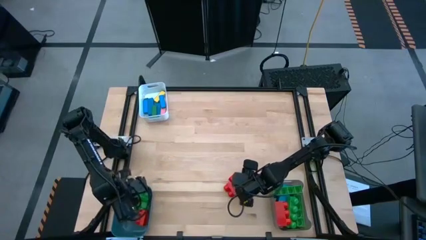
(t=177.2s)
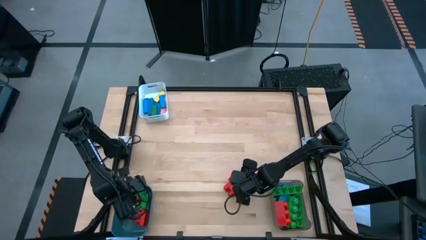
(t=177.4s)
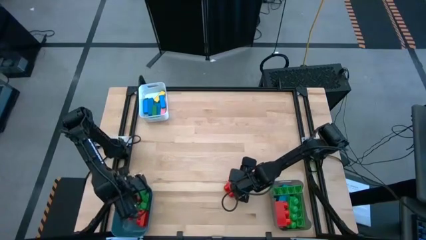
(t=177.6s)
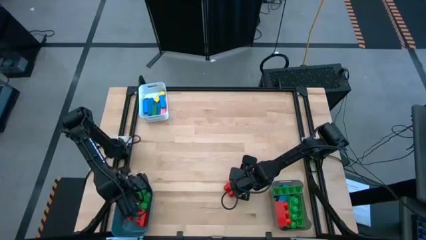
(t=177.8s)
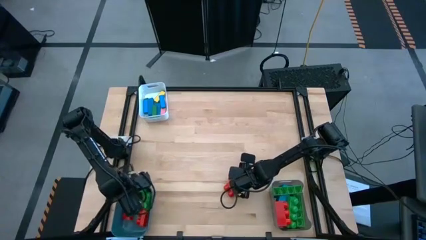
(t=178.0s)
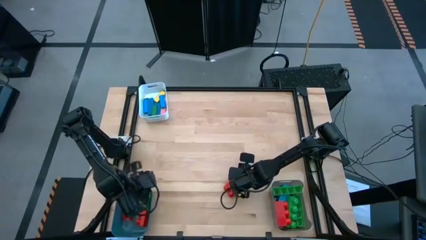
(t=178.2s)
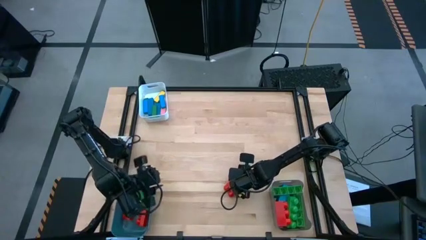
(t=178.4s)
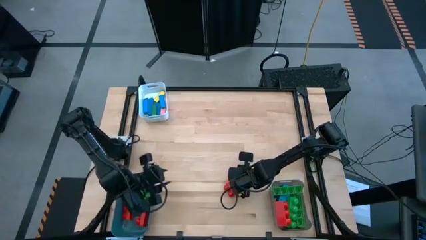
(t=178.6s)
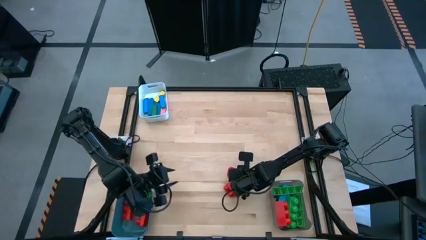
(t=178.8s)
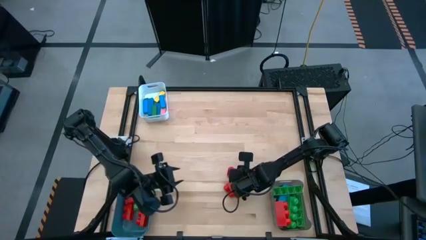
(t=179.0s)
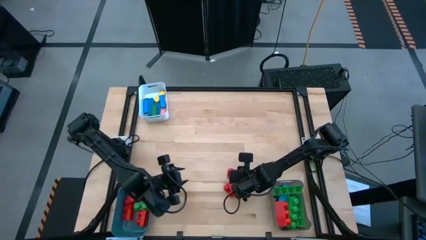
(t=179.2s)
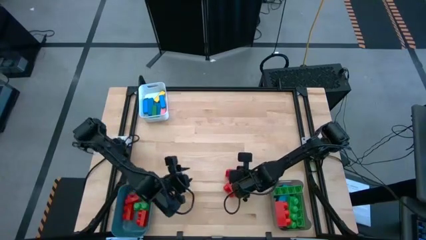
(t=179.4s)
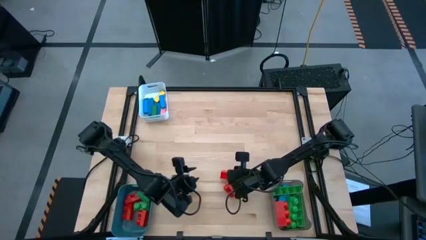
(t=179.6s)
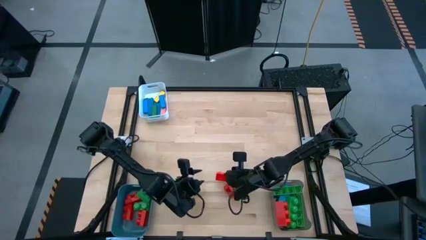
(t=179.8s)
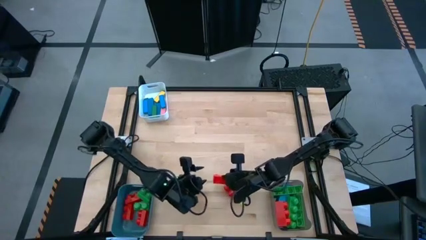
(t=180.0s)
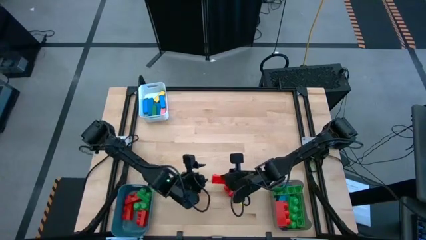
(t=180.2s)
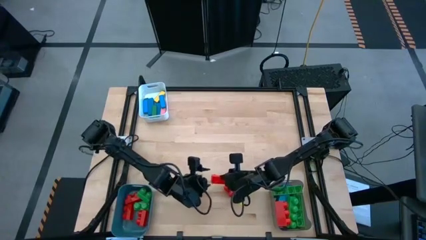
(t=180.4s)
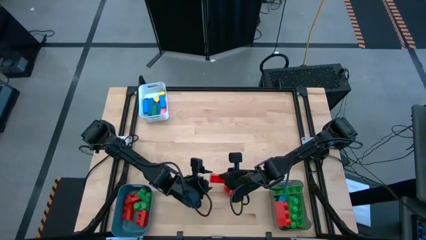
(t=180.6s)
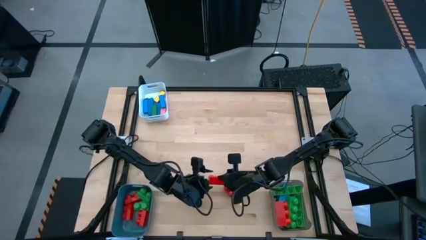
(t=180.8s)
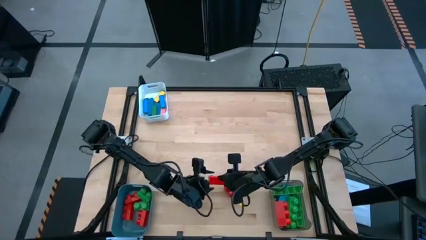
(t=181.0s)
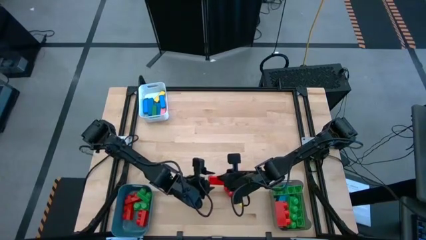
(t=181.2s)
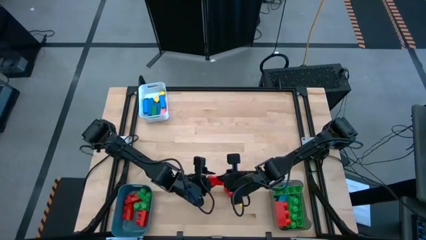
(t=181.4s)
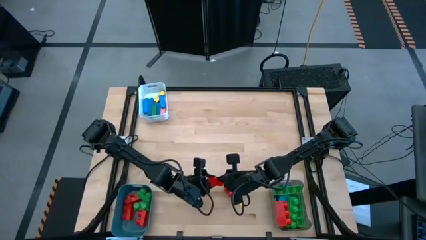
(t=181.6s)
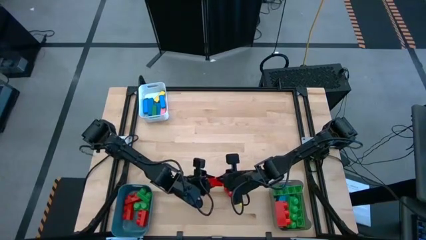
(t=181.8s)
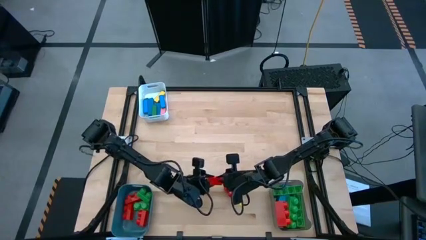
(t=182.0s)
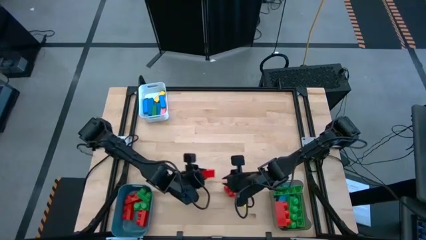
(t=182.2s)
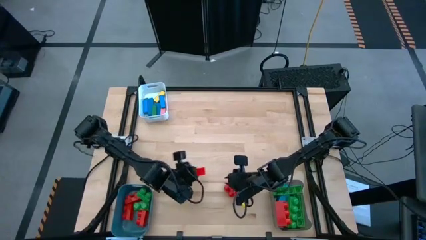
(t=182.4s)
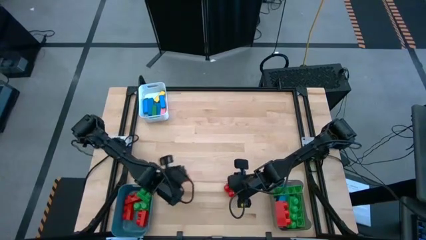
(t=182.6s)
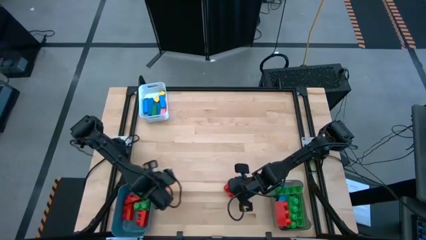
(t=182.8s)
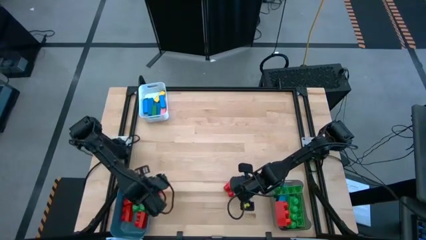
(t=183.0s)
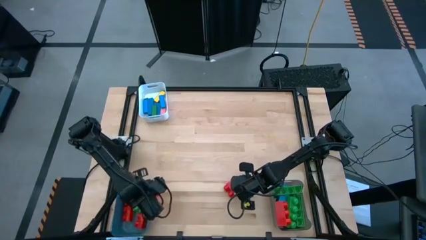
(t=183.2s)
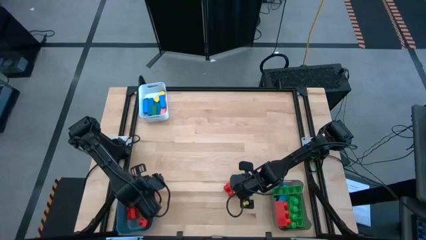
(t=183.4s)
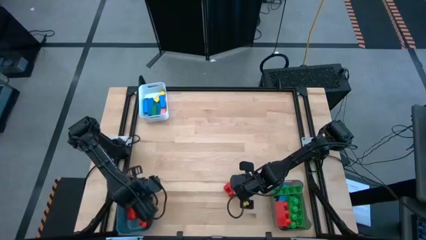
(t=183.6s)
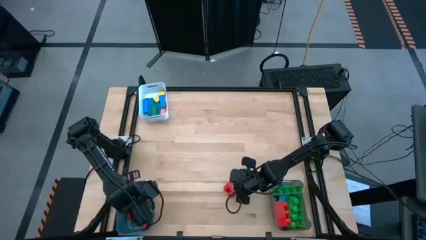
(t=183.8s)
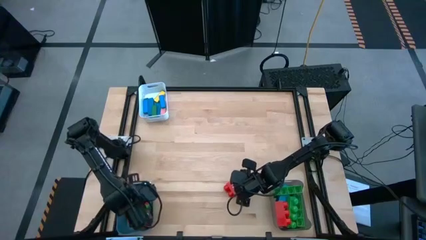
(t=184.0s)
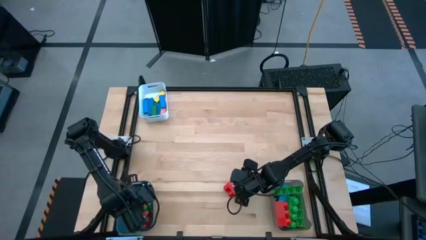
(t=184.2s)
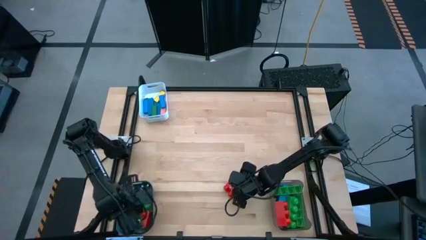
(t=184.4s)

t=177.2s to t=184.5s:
Task: Sort blocks by size
Put the red 2 stud gamepiece into the blue bin

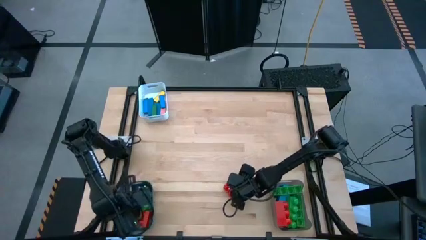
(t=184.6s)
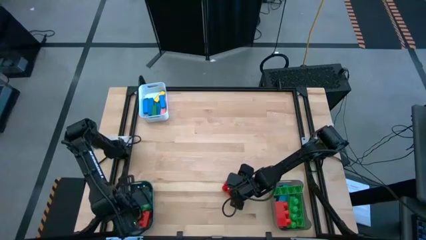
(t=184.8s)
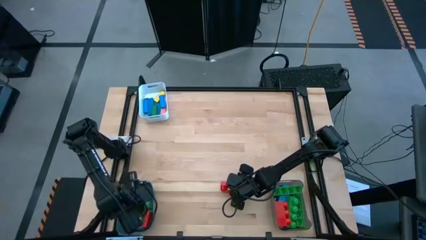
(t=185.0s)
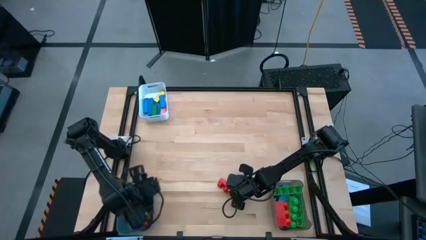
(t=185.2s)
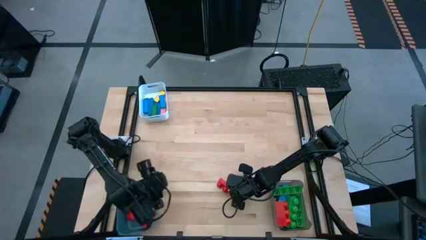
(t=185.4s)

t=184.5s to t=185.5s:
Put the red 2 stud gamepiece into the blue bin

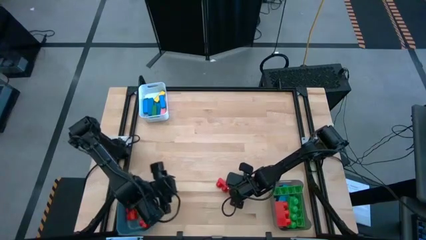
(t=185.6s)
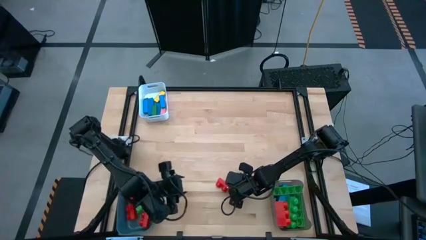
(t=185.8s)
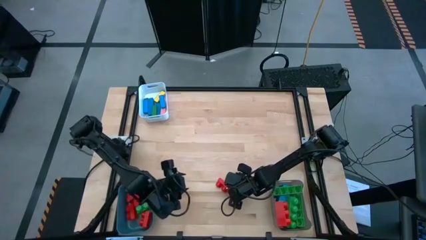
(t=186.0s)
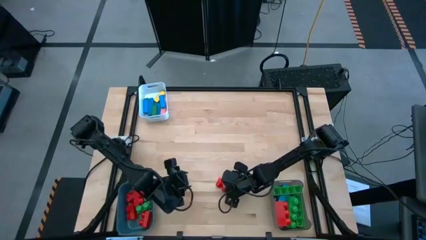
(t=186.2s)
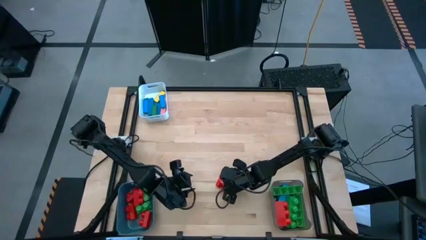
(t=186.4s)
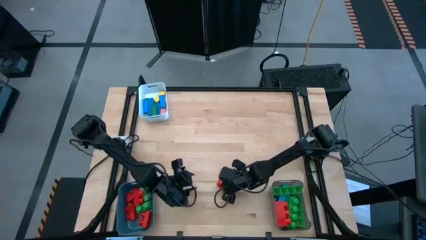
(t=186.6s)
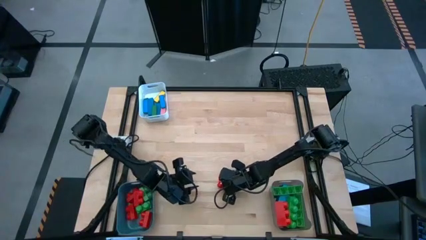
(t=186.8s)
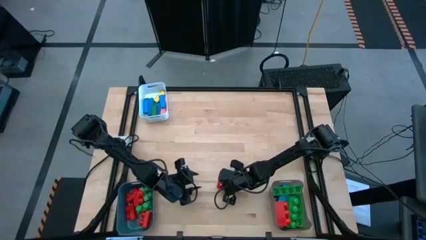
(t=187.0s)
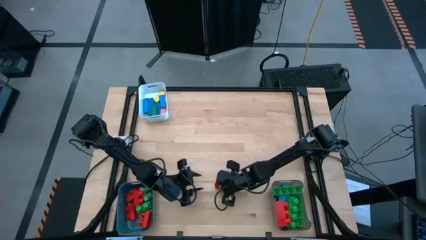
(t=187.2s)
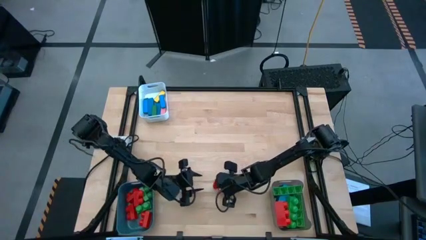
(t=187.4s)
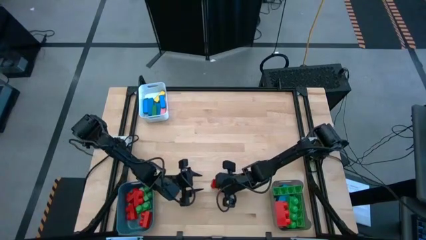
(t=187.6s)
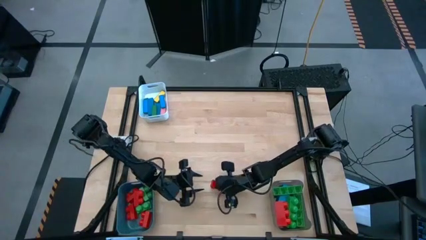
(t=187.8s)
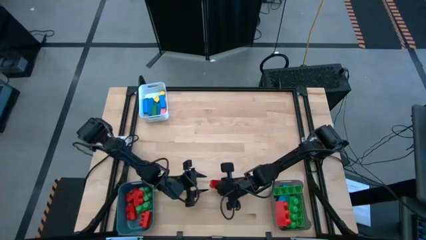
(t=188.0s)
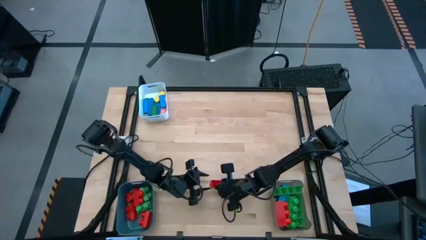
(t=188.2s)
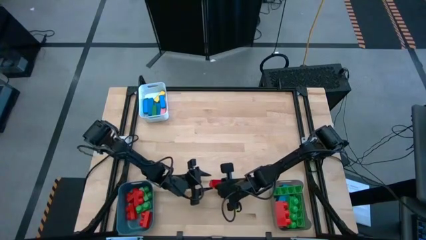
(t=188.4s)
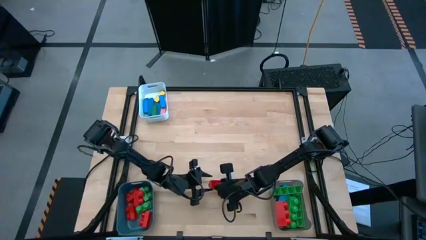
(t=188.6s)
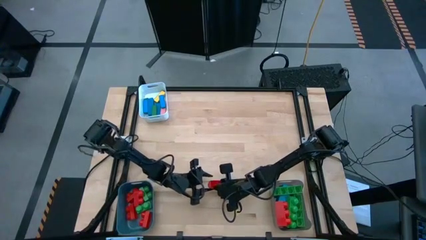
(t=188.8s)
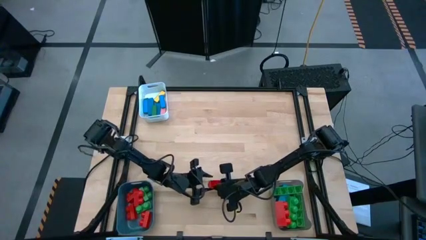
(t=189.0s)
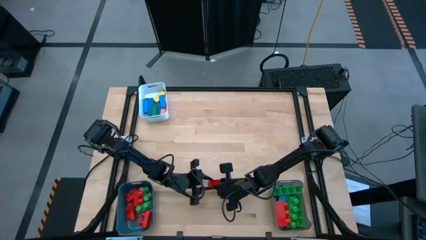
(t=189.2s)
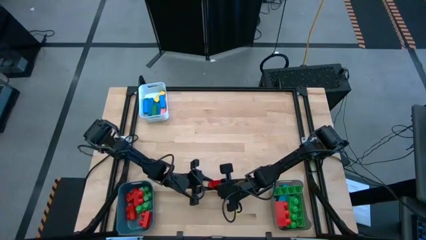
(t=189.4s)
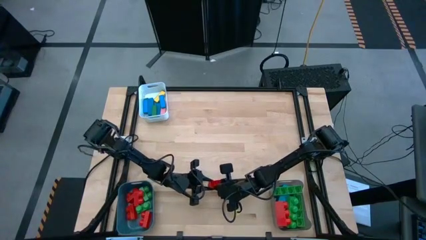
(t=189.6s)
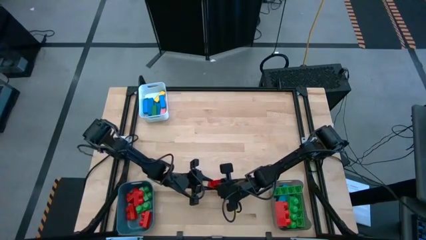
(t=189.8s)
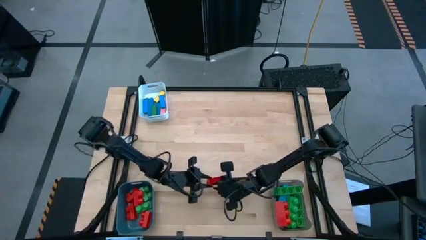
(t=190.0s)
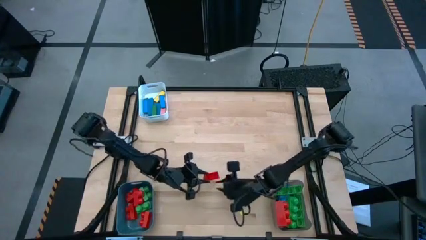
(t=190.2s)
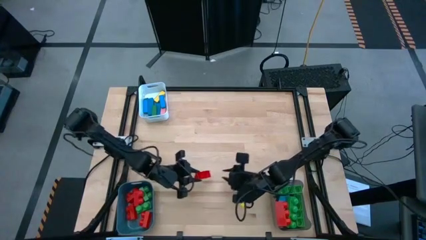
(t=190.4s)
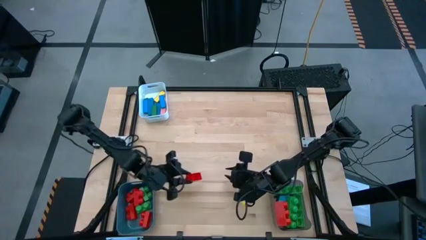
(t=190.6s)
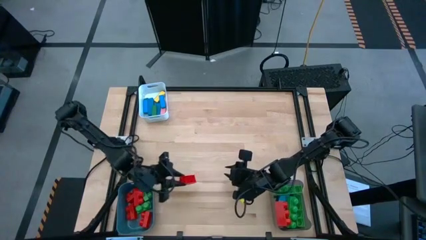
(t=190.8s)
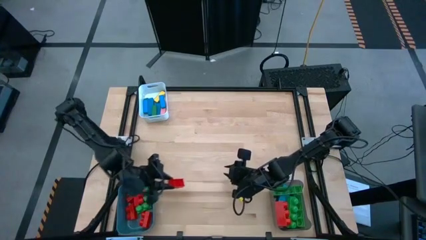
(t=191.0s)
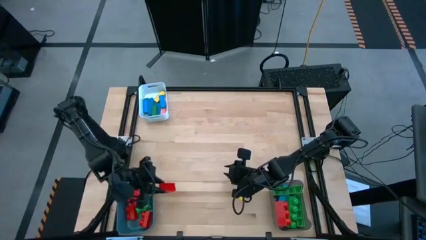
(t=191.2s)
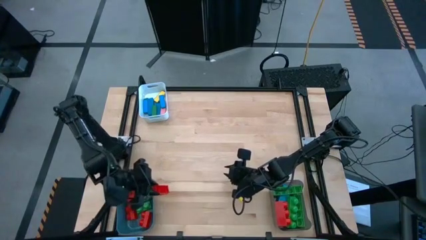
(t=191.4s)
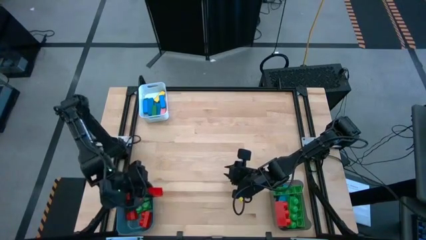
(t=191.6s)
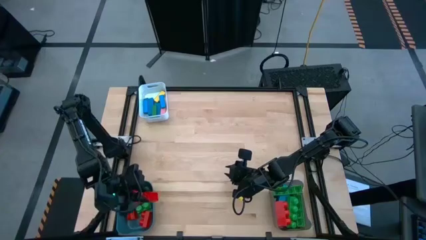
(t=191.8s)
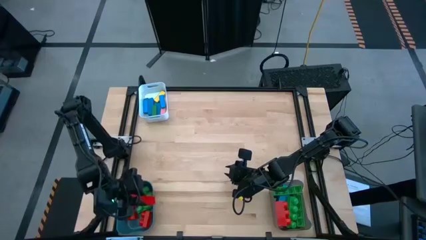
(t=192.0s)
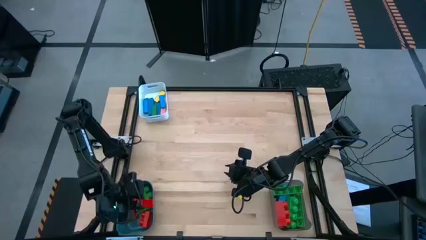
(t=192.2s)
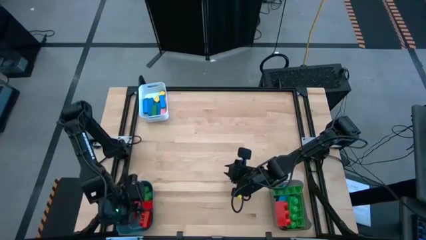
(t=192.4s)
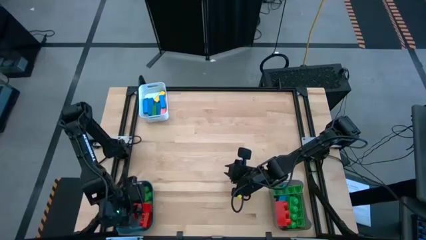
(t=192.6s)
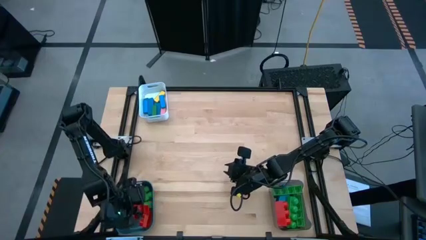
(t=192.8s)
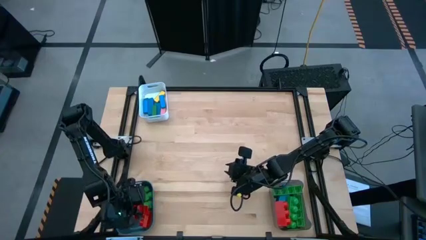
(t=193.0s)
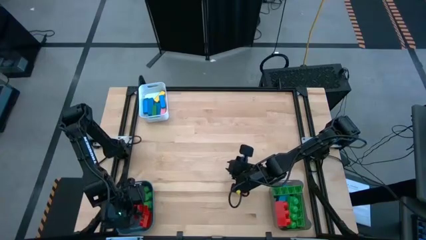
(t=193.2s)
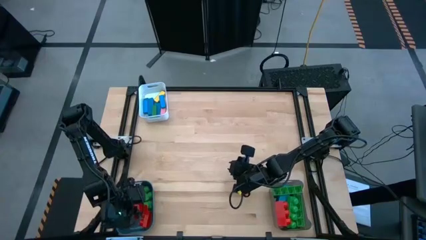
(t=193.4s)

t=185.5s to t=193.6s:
Put the red 2 stud gamepiece into the blue bin
